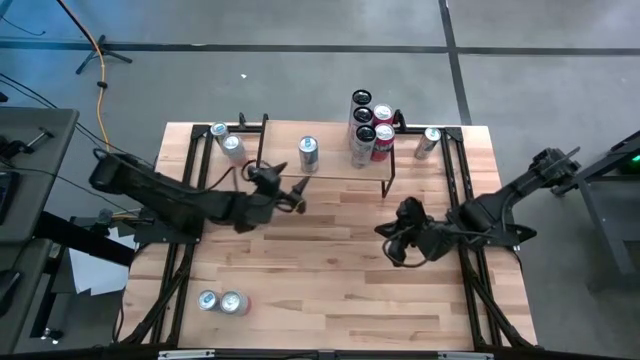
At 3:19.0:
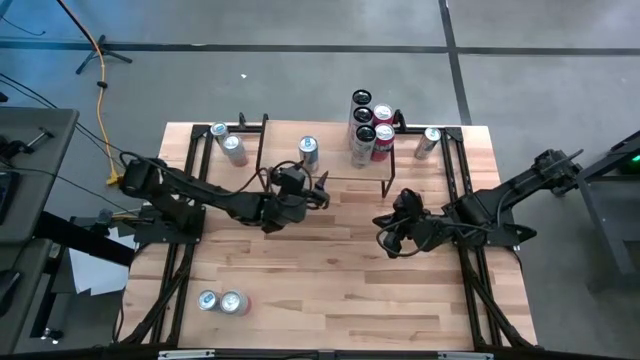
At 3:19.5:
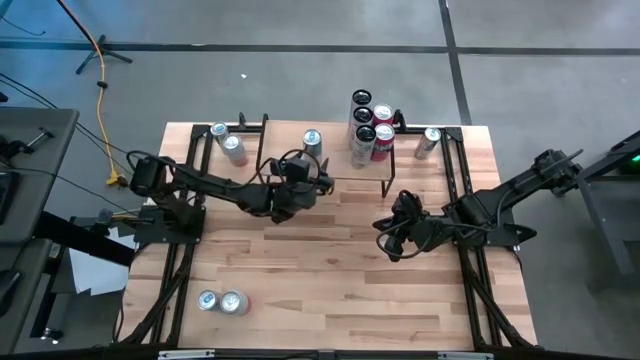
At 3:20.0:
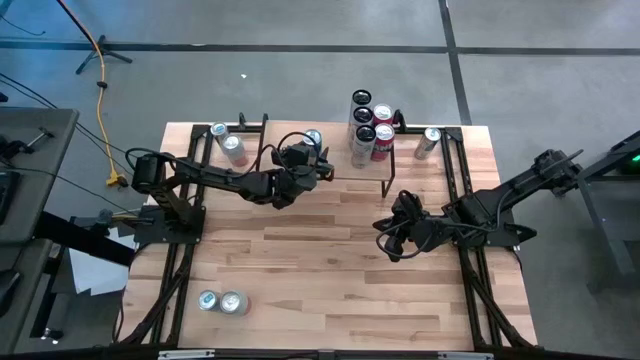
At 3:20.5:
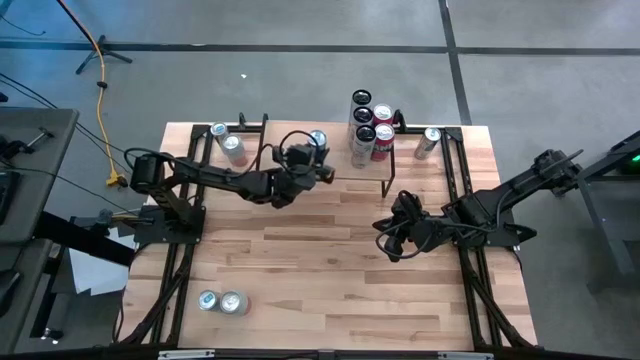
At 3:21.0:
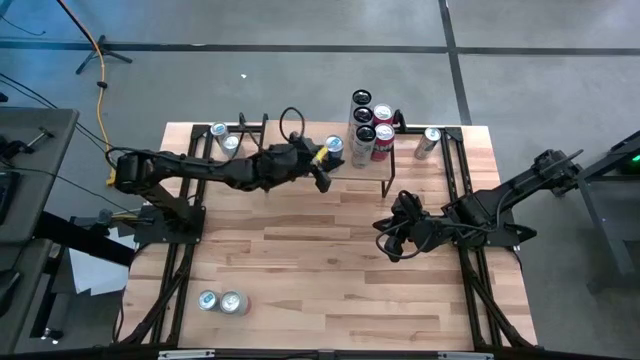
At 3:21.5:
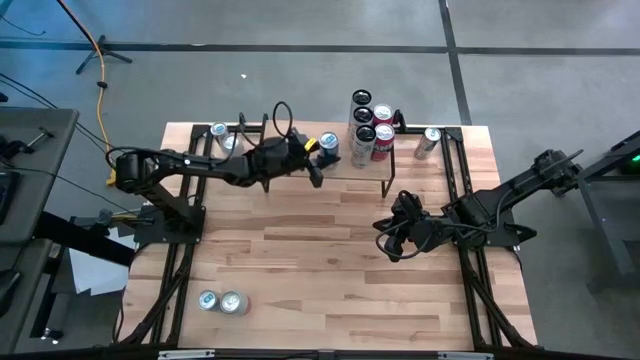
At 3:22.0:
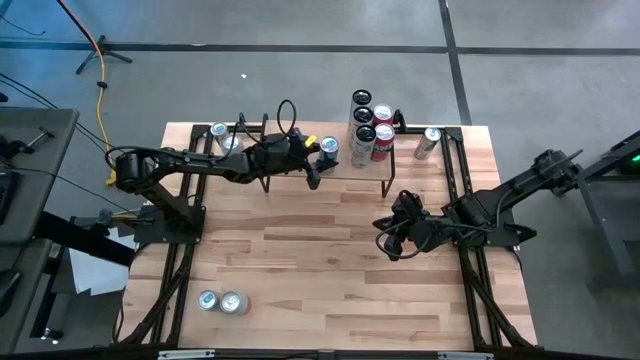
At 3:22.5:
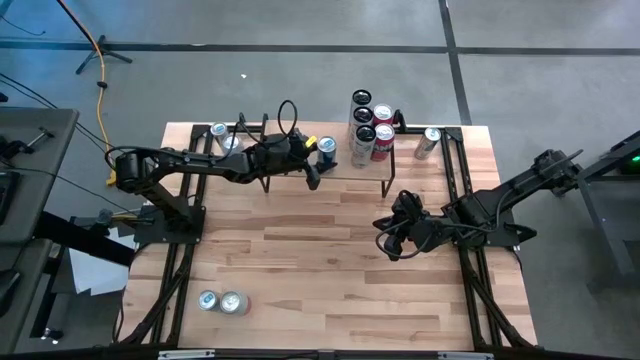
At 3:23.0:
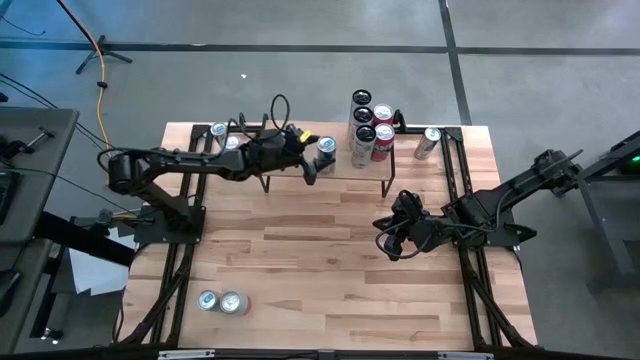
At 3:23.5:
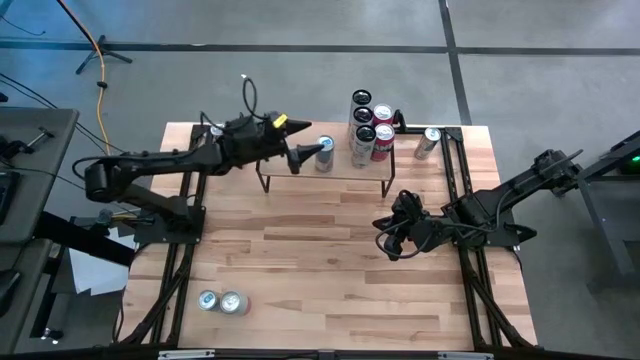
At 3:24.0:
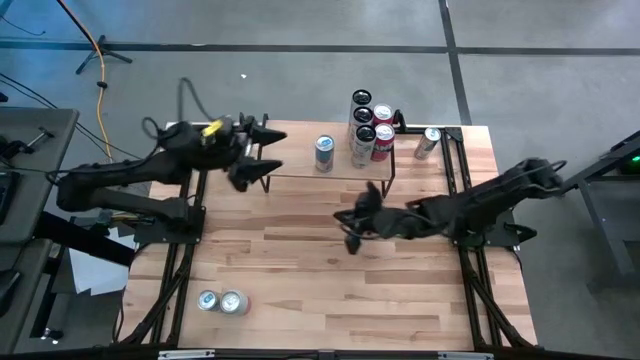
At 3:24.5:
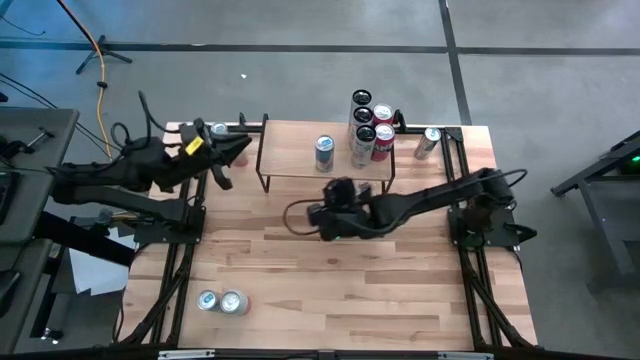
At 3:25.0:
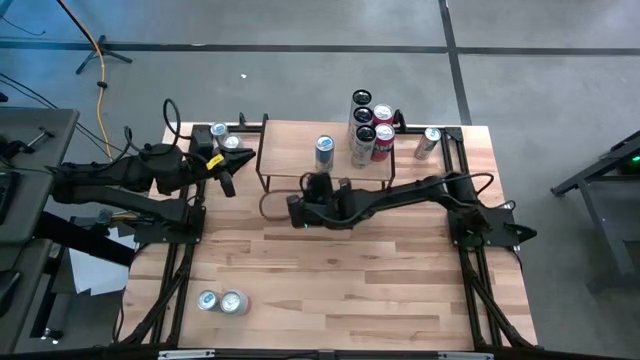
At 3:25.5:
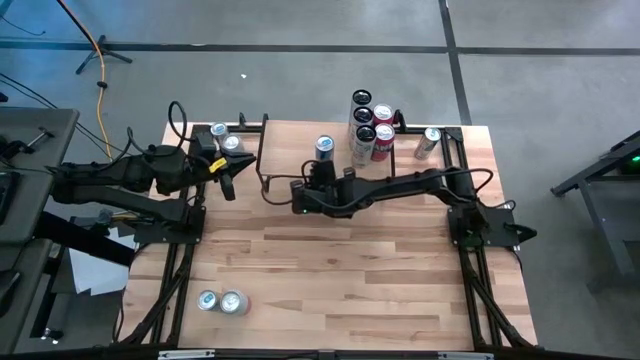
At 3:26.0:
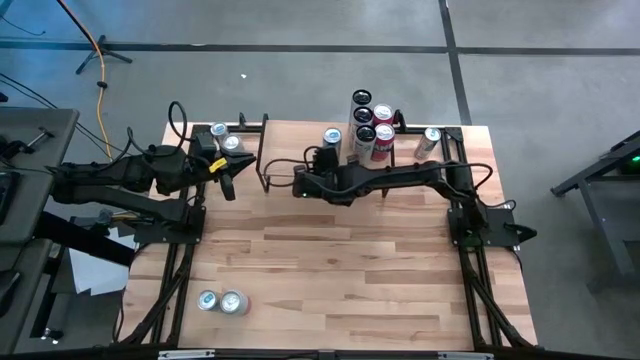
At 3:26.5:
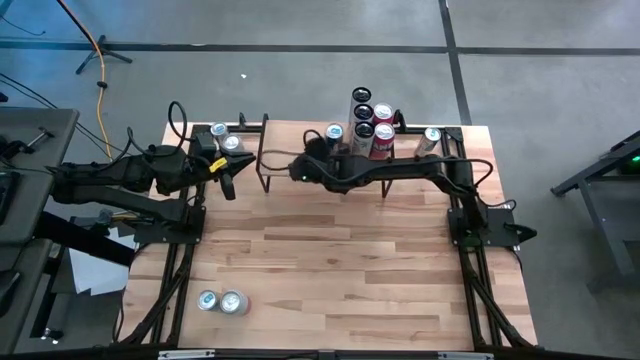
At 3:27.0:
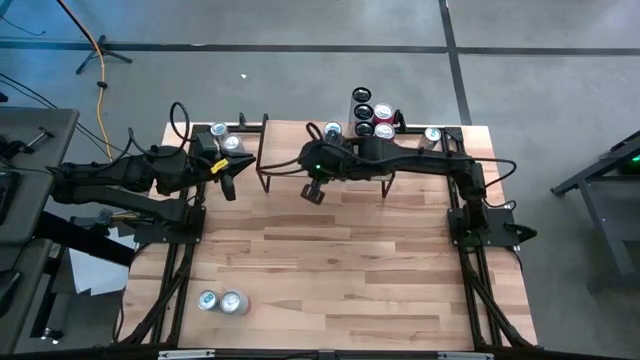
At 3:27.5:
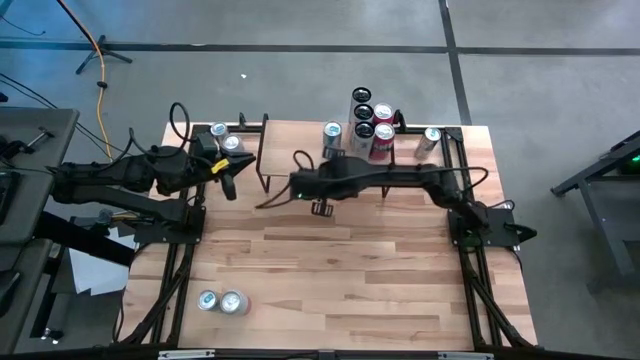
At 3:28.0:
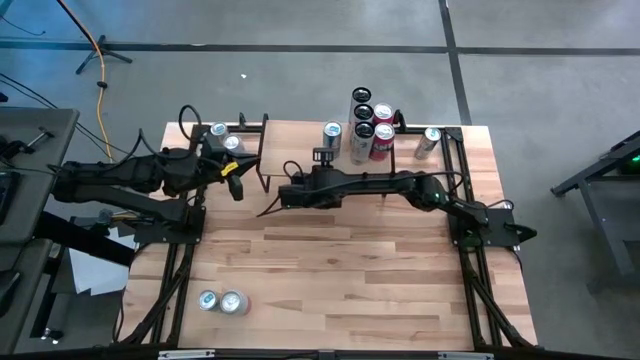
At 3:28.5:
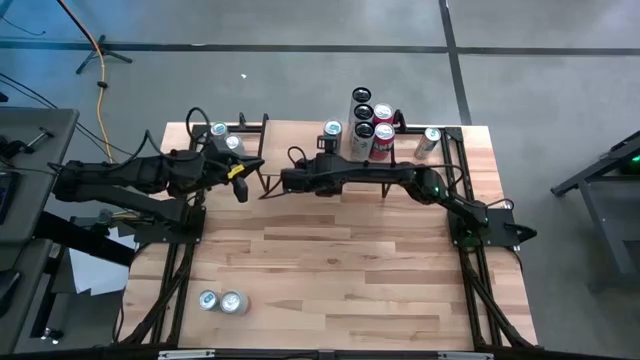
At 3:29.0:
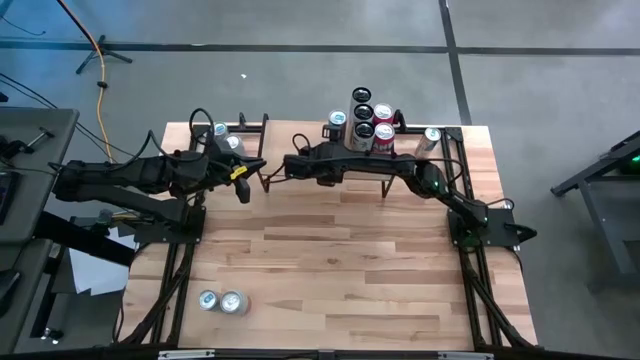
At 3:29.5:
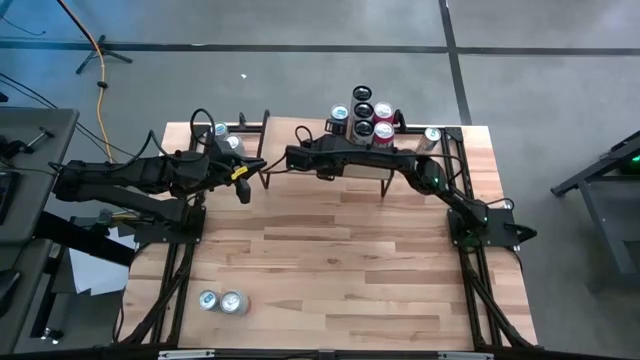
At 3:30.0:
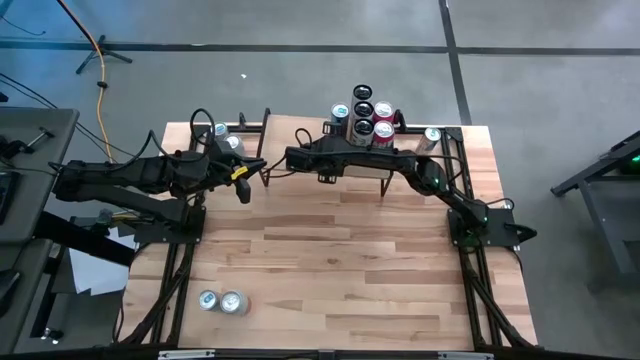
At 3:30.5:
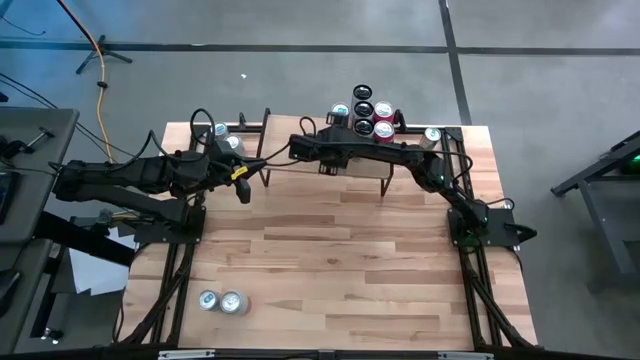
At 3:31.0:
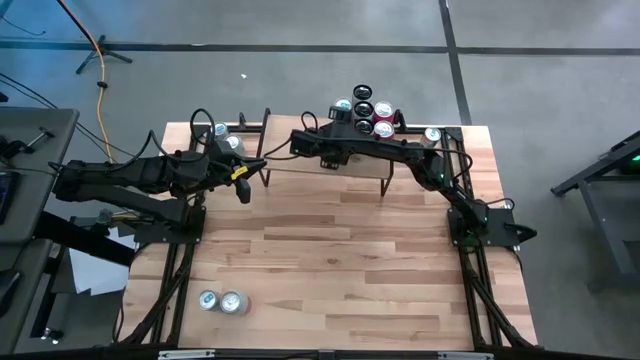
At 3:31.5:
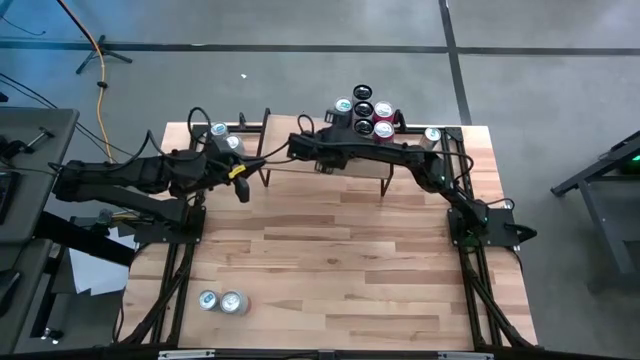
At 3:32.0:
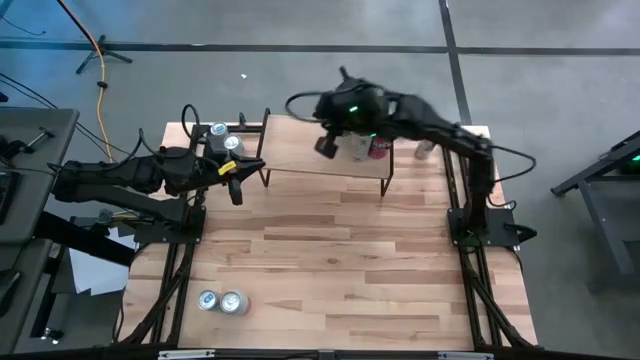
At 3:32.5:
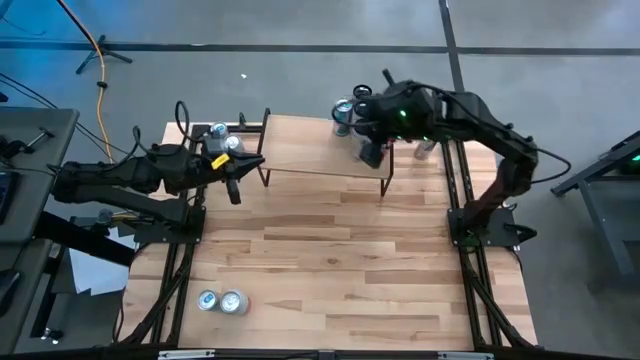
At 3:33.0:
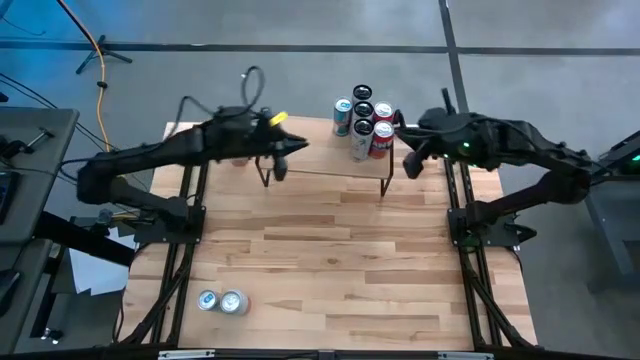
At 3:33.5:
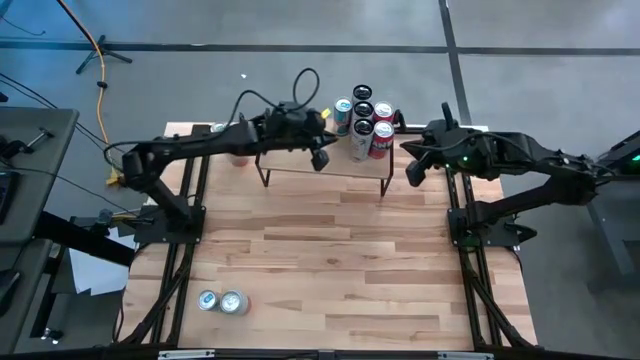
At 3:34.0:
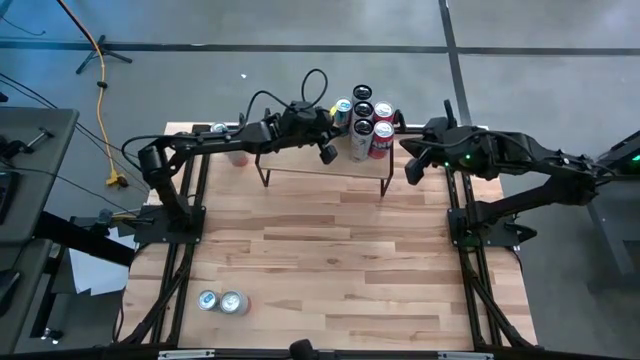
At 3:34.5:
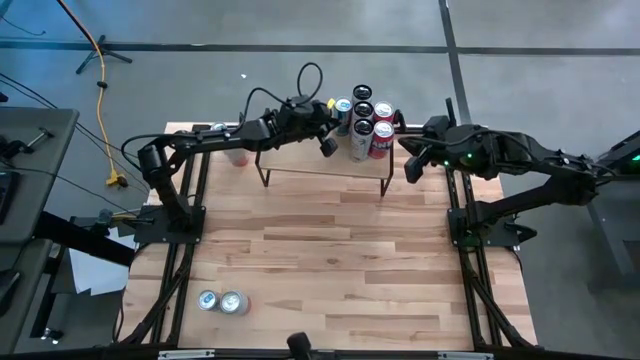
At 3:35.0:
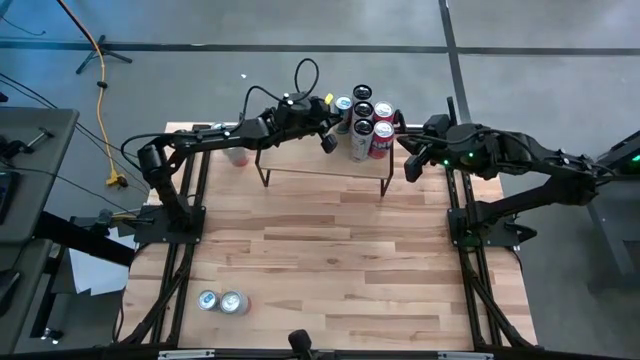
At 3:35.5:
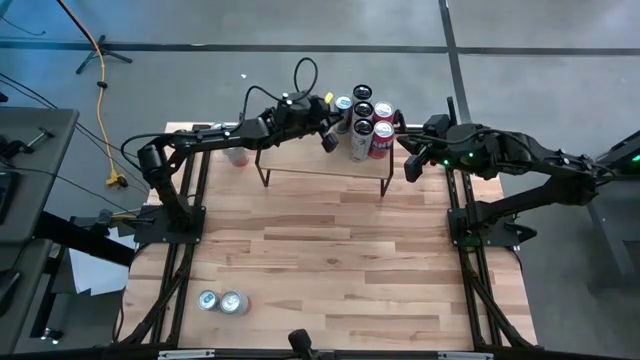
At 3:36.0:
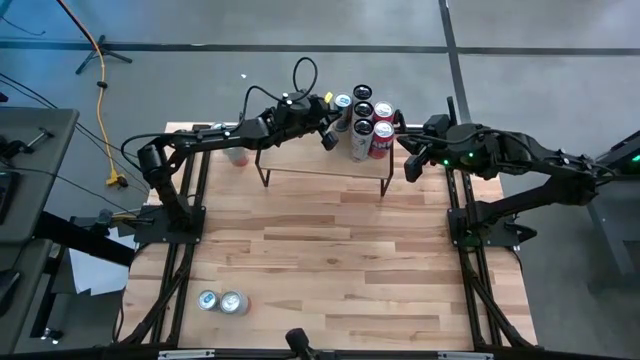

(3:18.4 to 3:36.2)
Task: Place canned beverage on shelf
Put the bottom right blue soda can on the shelf

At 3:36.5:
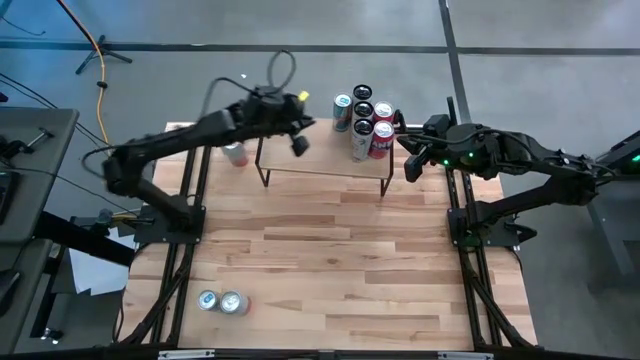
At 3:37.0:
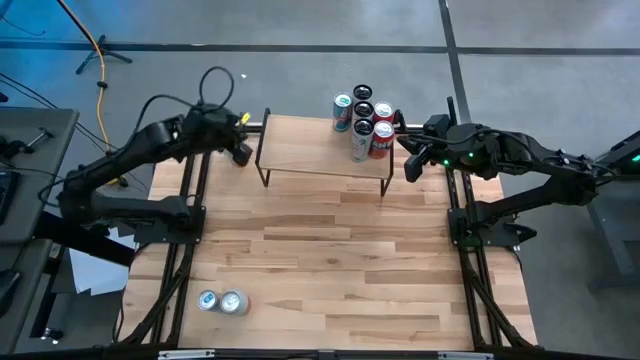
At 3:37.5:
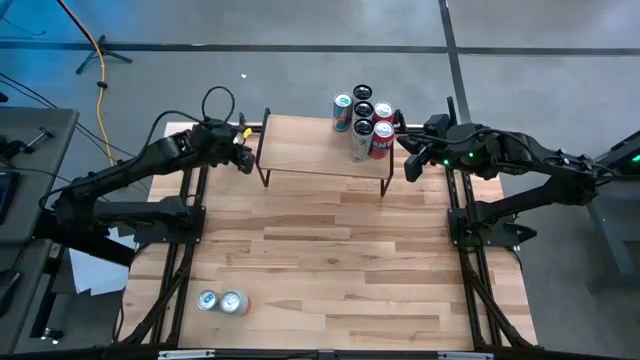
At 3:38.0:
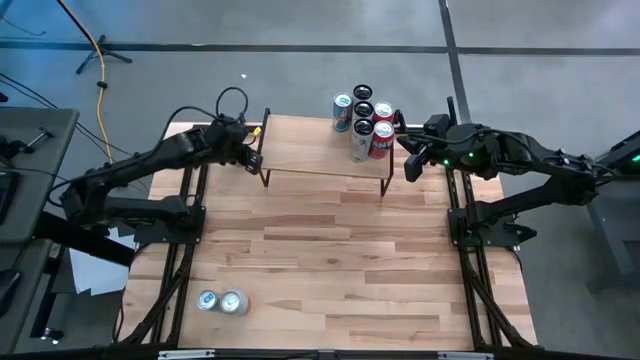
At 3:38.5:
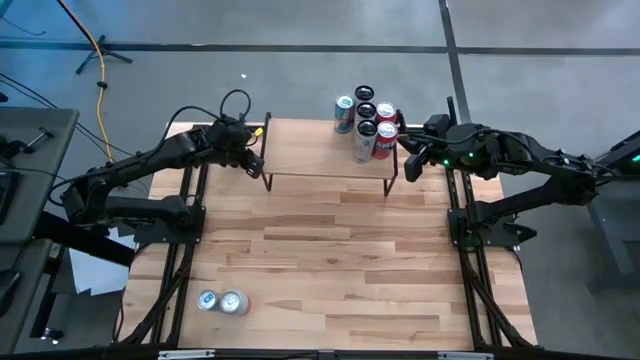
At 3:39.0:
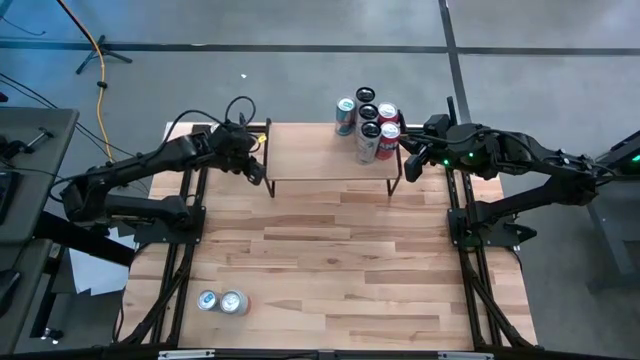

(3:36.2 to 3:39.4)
Adjust the shelf
